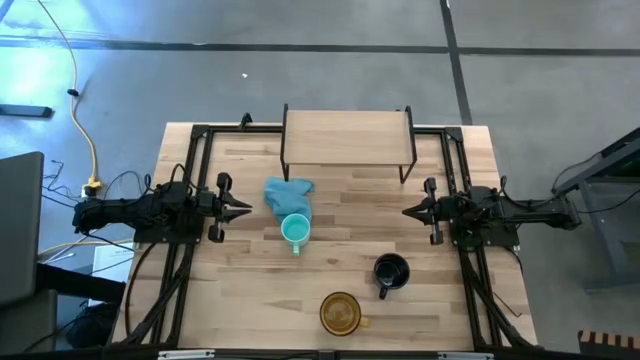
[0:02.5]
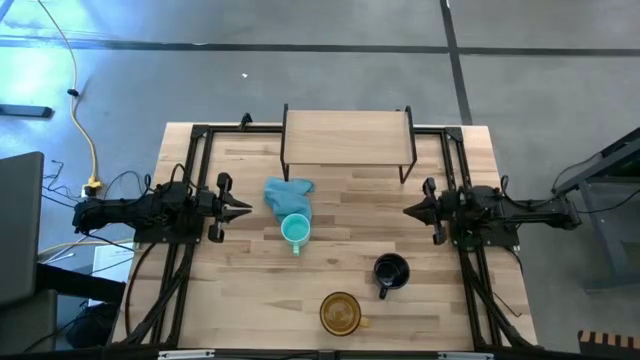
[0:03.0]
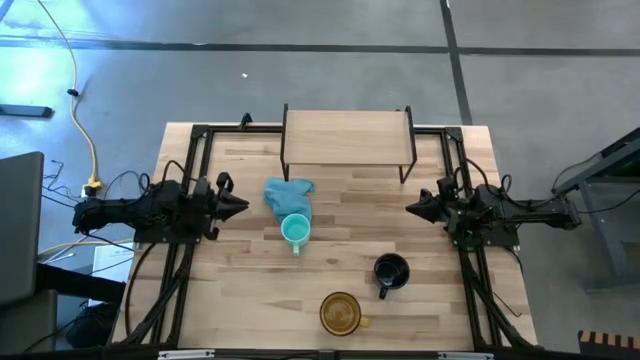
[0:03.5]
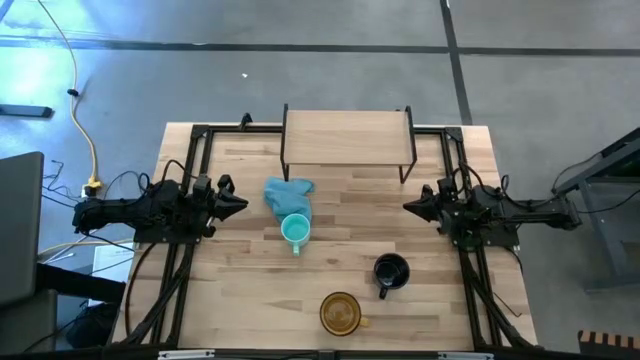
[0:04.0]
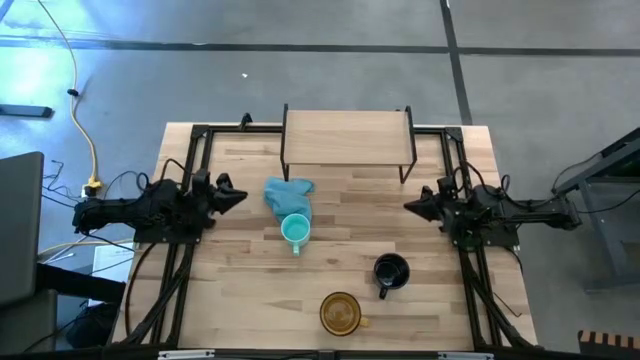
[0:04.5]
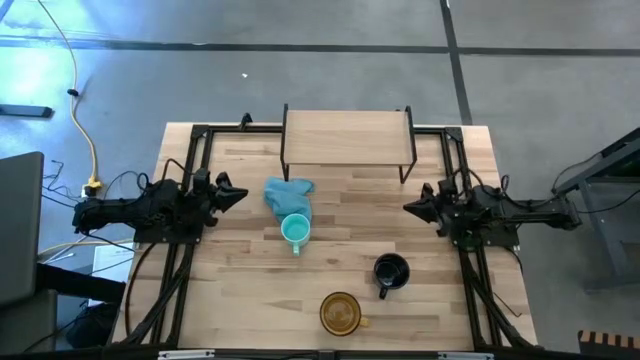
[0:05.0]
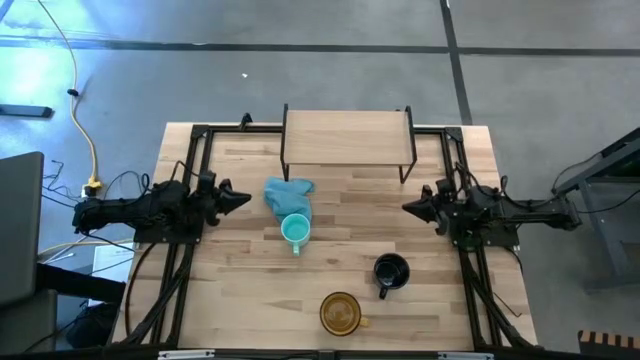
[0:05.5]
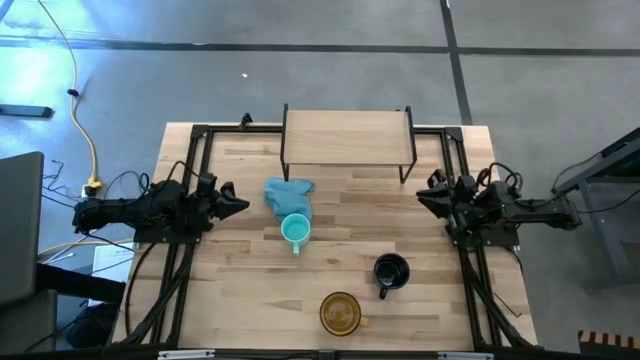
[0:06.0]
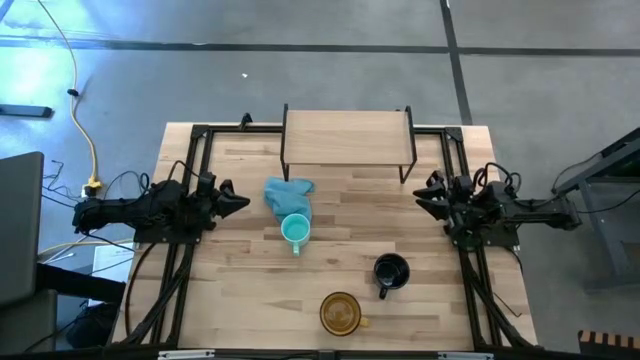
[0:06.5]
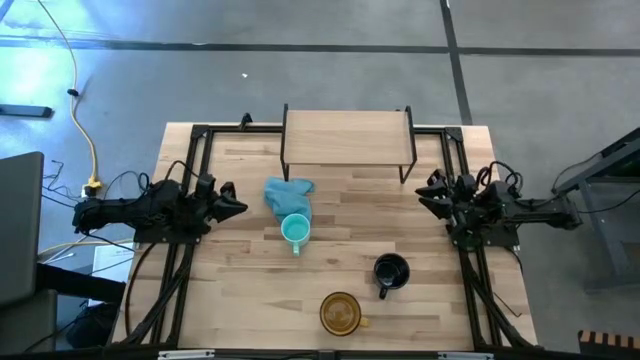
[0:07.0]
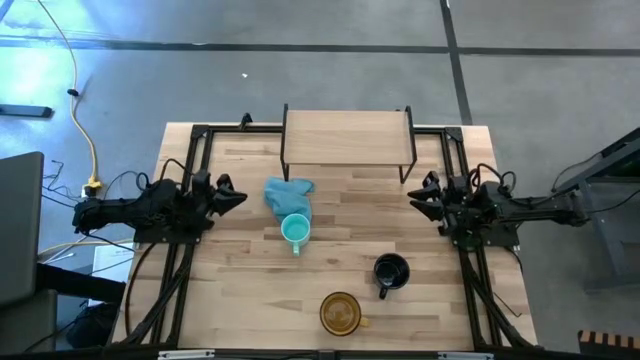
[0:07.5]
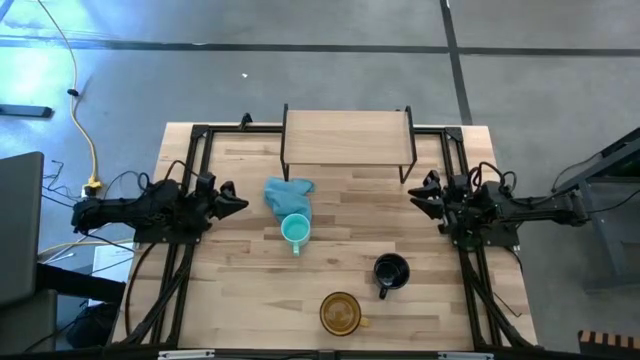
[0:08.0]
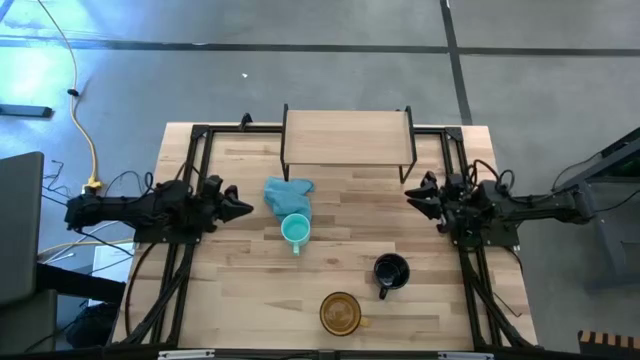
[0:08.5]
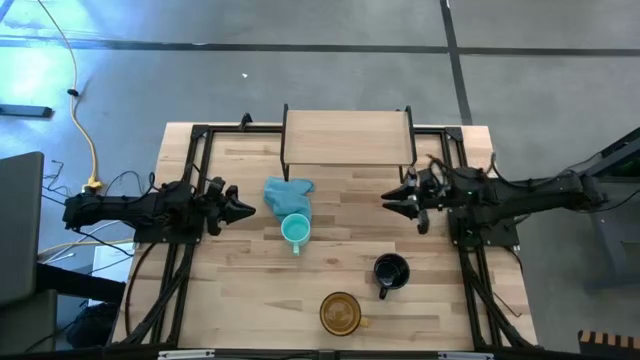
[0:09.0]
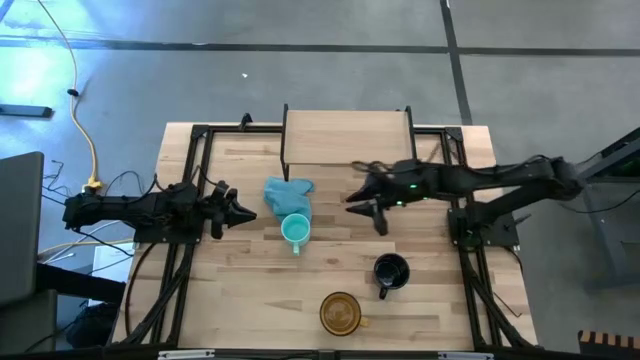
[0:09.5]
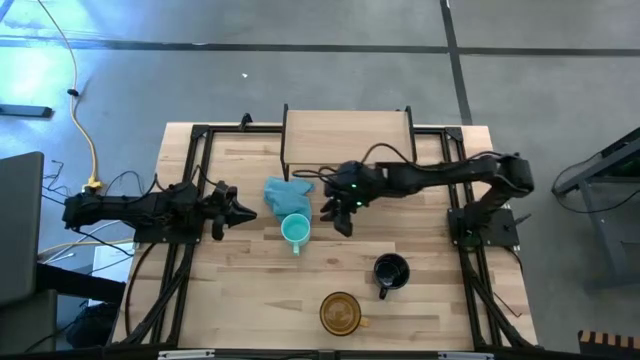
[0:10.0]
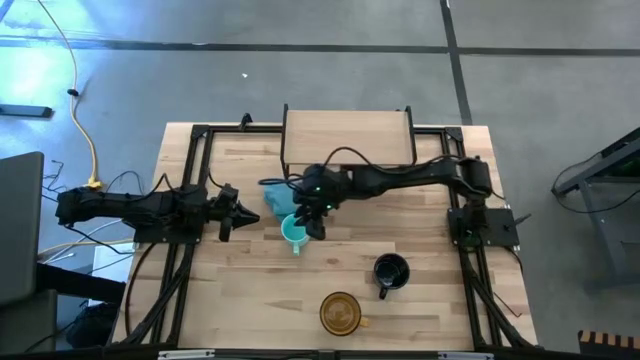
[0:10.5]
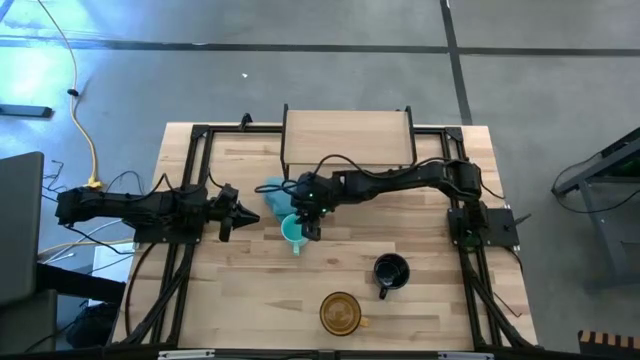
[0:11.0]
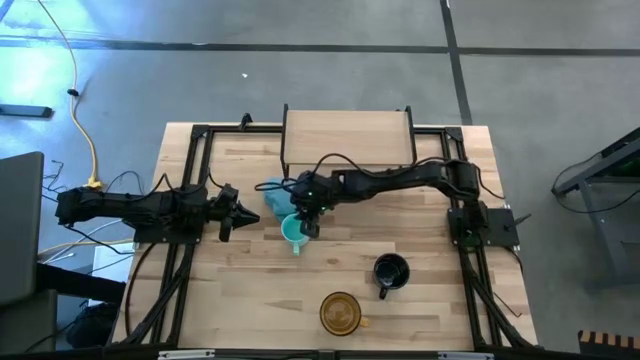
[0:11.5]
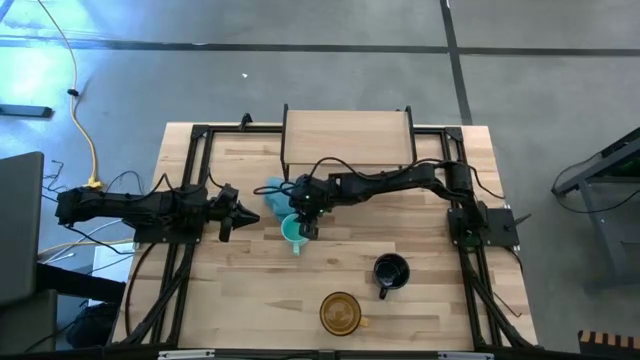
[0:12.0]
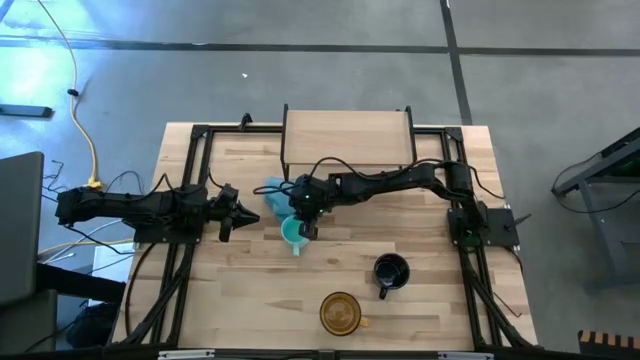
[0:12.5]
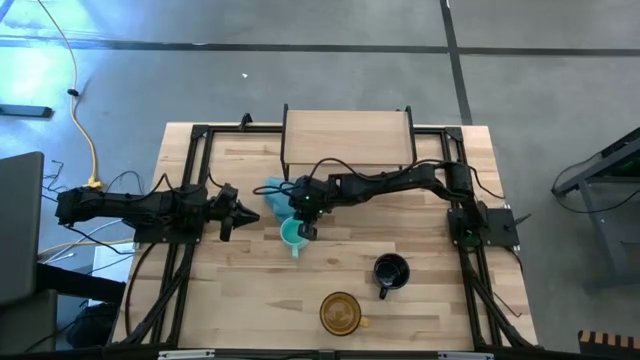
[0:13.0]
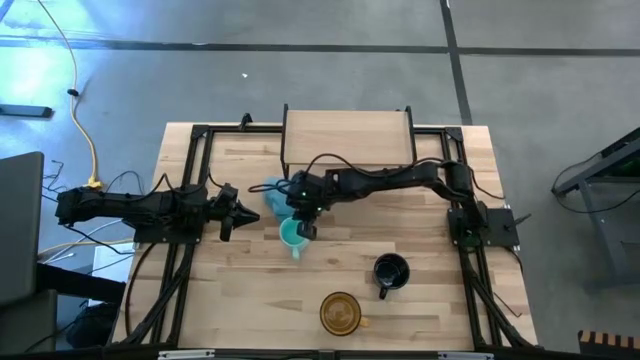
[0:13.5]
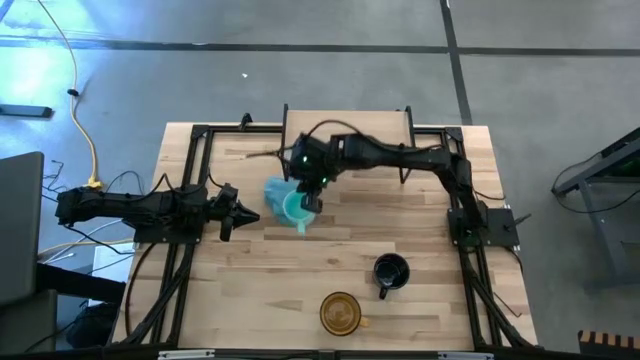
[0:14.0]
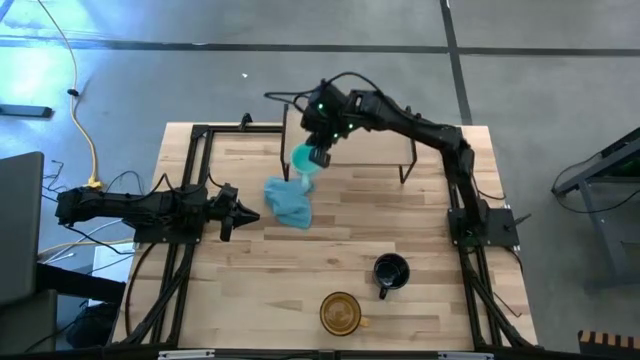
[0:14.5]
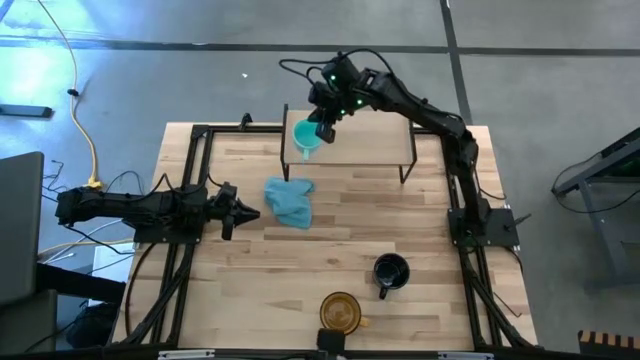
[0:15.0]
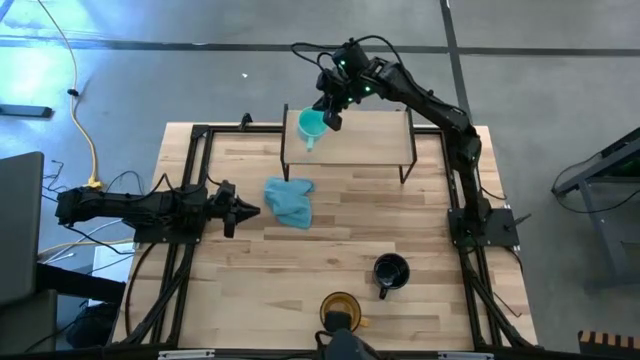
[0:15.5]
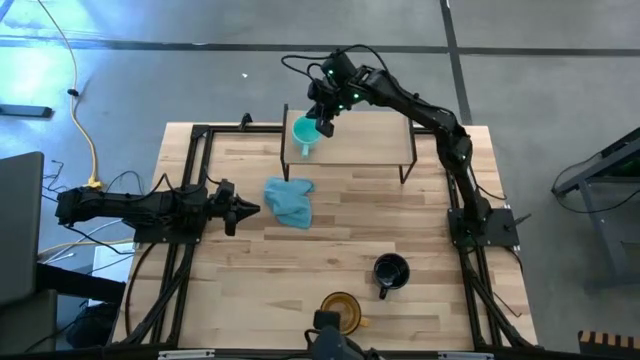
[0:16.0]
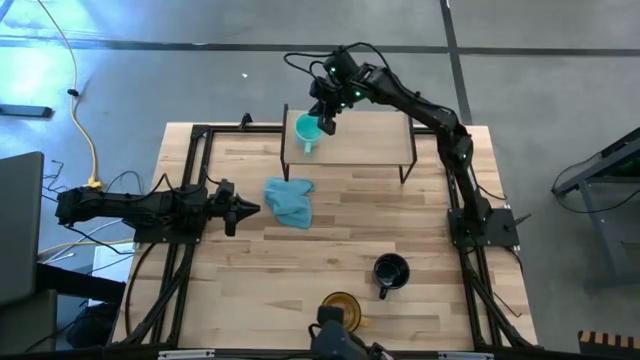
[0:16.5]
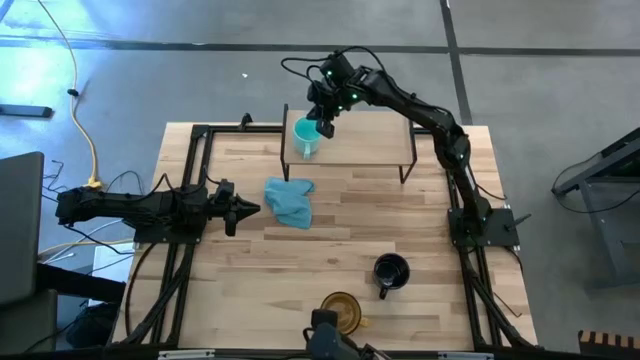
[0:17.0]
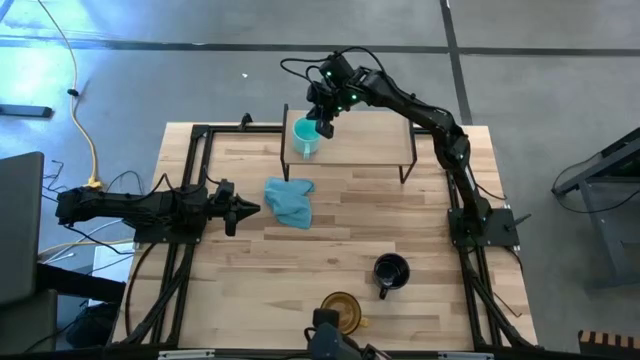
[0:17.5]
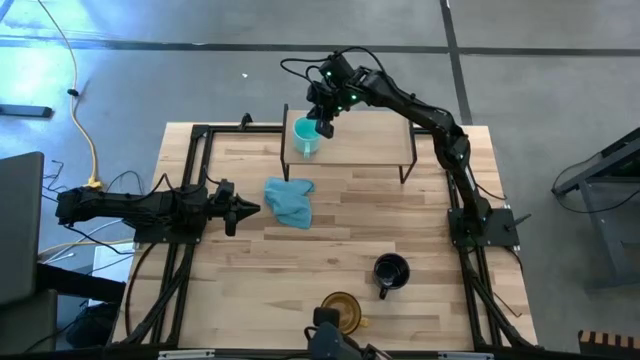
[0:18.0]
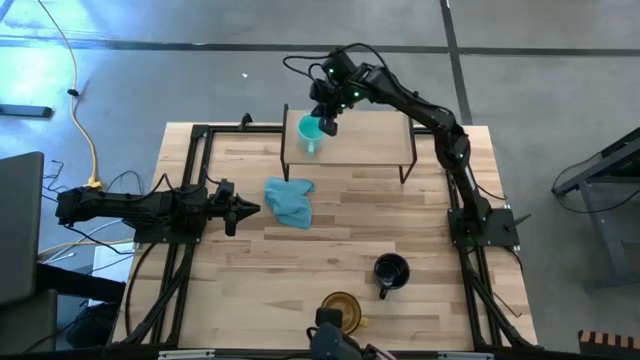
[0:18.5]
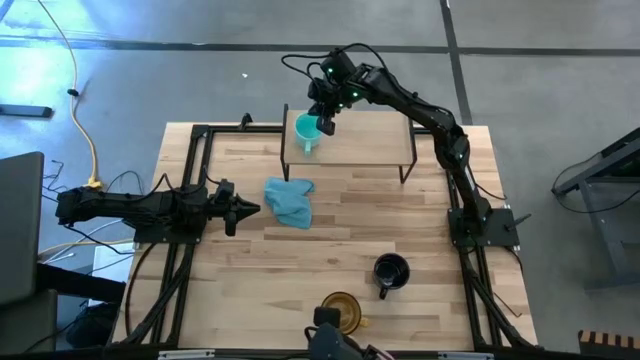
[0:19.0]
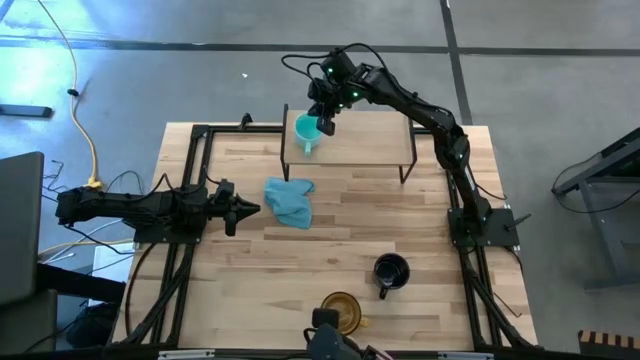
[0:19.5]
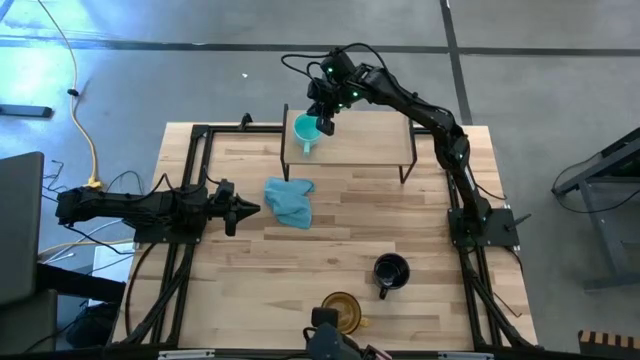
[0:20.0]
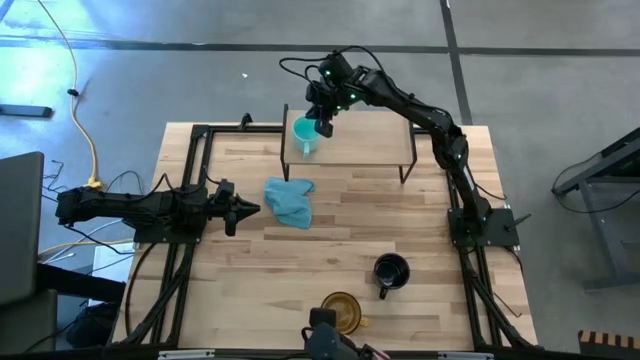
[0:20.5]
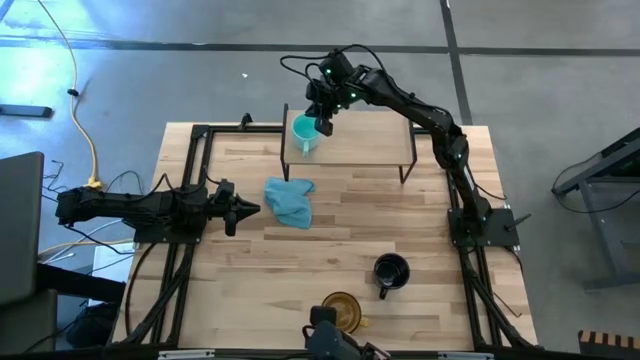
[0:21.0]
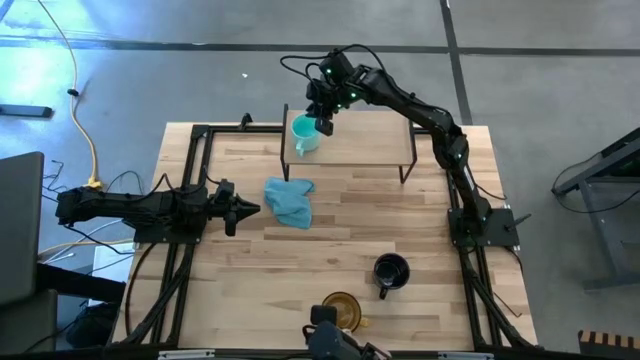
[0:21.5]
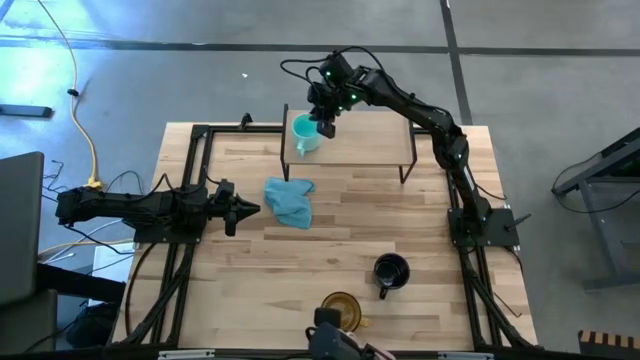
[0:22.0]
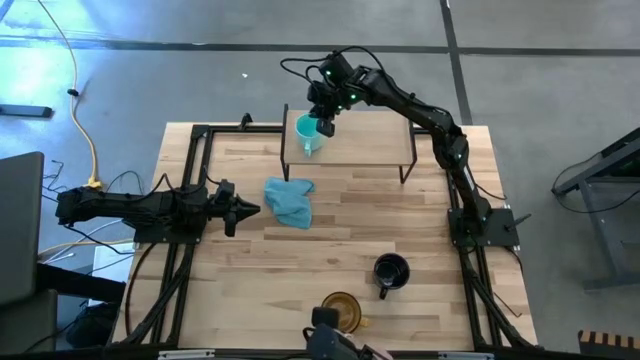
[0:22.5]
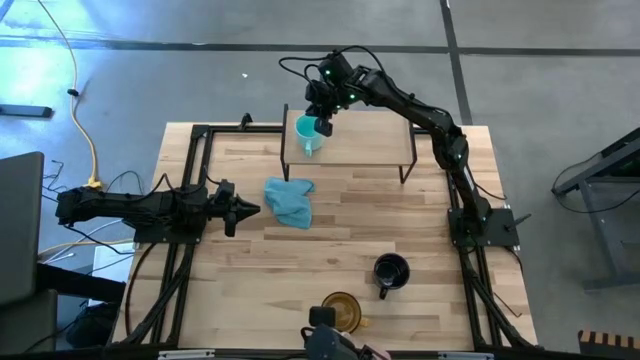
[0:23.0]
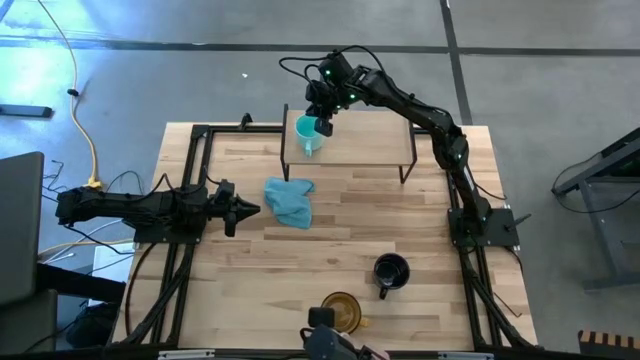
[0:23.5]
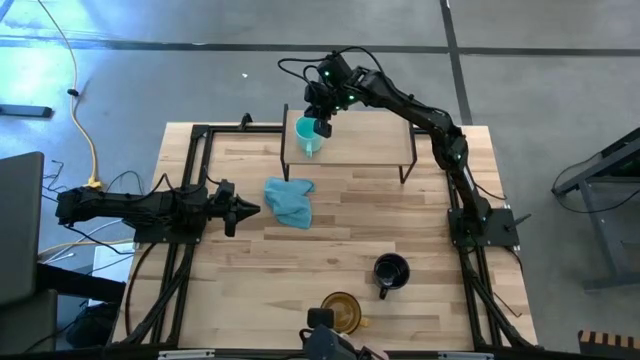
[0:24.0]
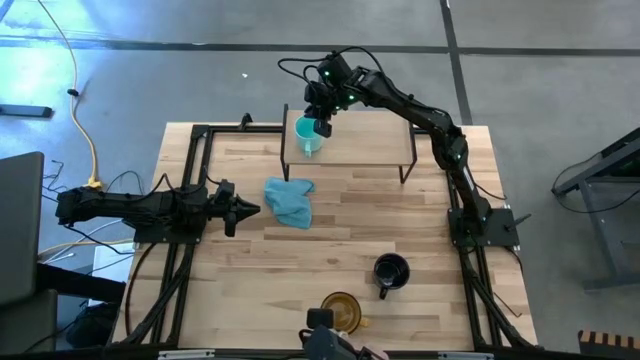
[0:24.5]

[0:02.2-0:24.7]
Task: Stack small to large cups/mugs on shelf
Put the blue mug on the shelf
